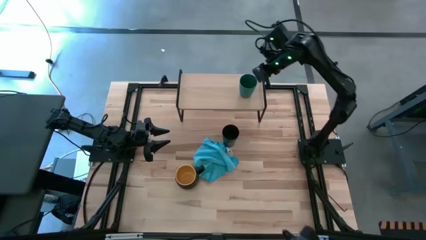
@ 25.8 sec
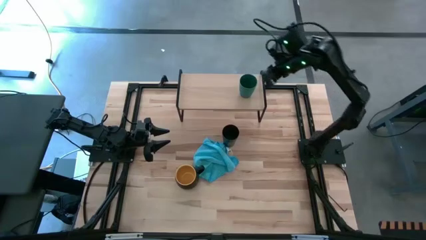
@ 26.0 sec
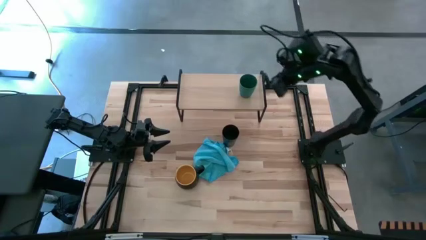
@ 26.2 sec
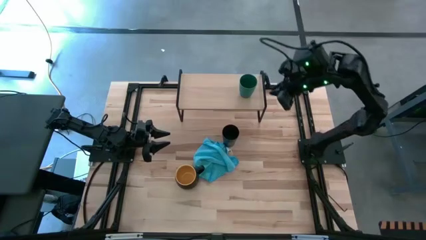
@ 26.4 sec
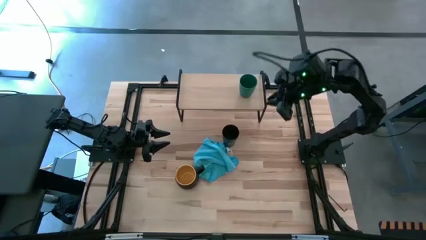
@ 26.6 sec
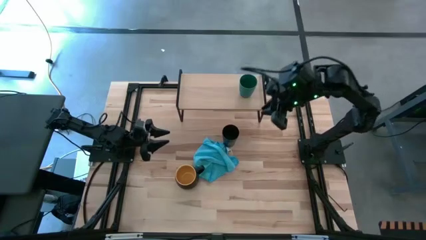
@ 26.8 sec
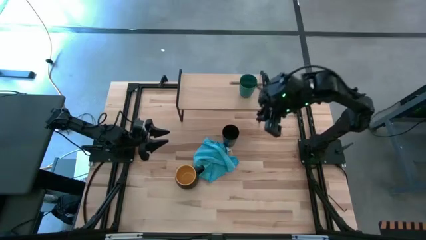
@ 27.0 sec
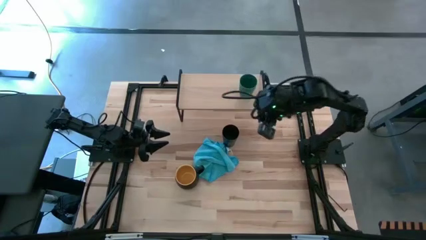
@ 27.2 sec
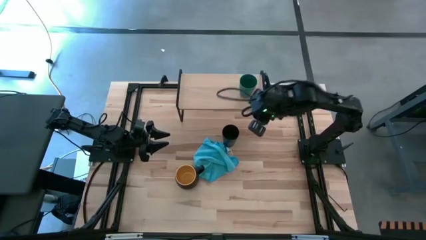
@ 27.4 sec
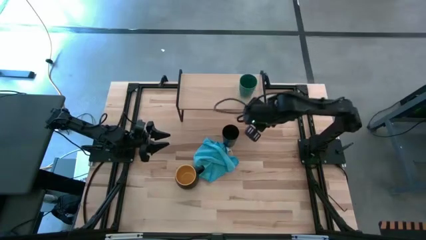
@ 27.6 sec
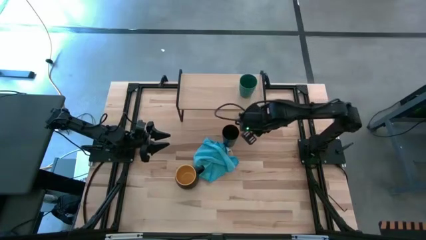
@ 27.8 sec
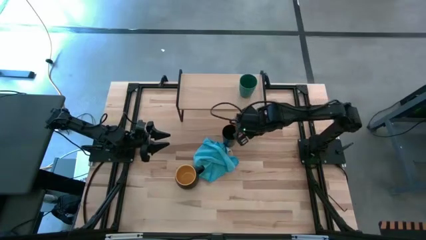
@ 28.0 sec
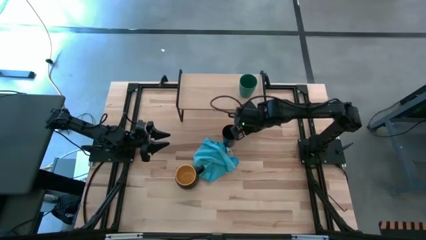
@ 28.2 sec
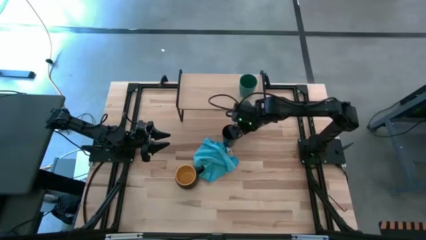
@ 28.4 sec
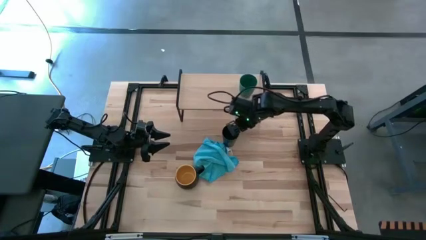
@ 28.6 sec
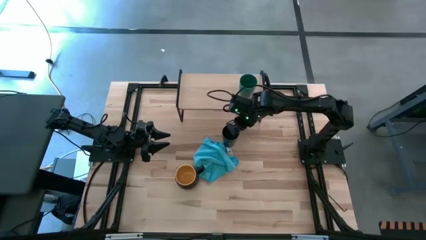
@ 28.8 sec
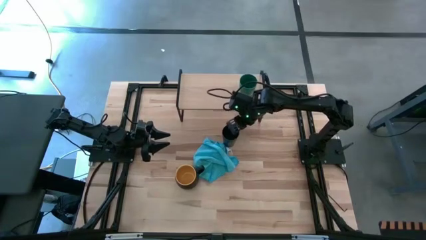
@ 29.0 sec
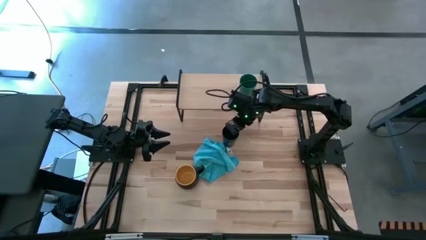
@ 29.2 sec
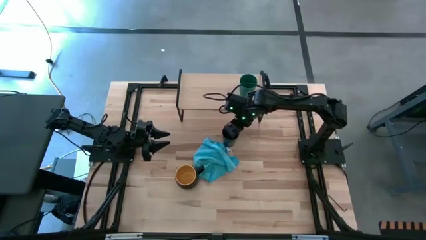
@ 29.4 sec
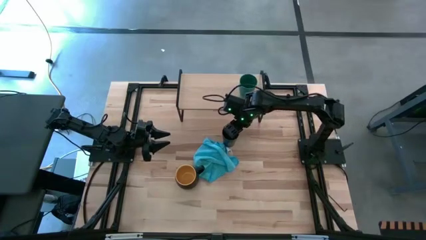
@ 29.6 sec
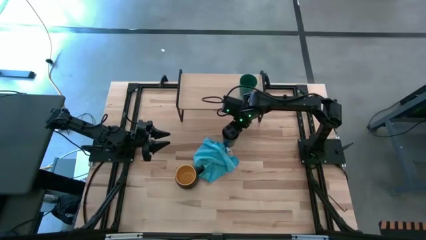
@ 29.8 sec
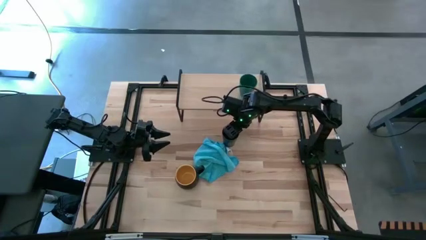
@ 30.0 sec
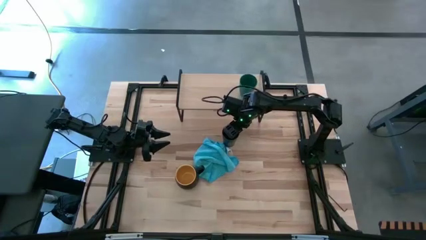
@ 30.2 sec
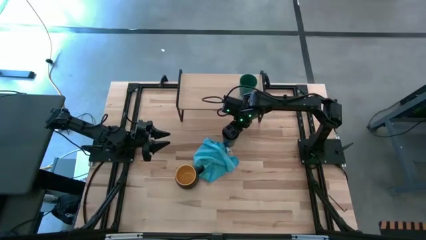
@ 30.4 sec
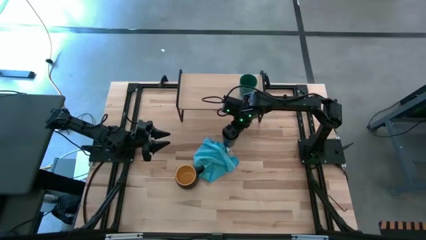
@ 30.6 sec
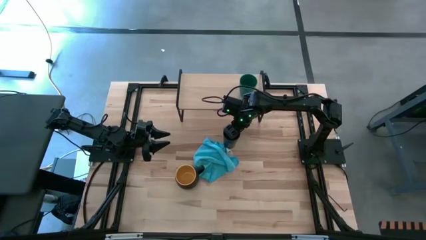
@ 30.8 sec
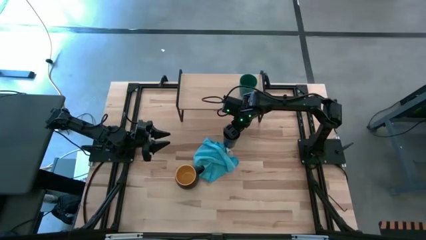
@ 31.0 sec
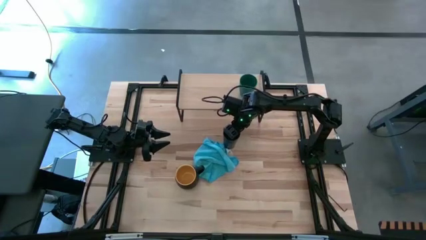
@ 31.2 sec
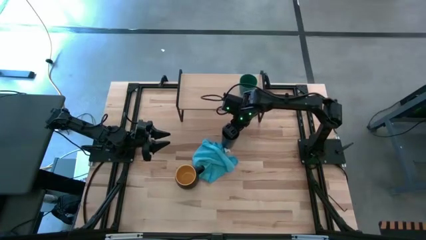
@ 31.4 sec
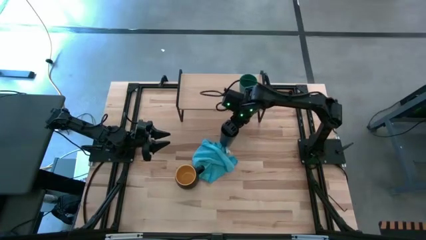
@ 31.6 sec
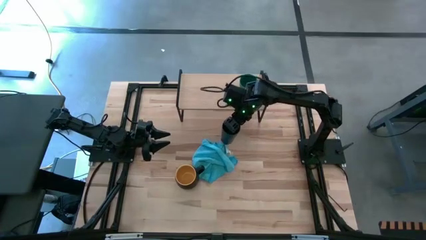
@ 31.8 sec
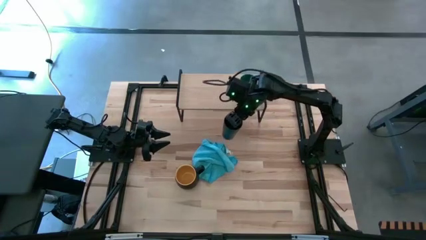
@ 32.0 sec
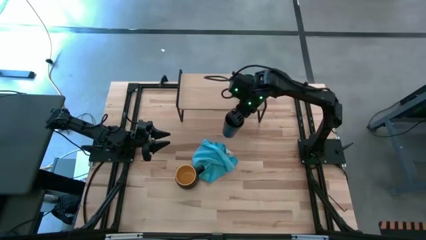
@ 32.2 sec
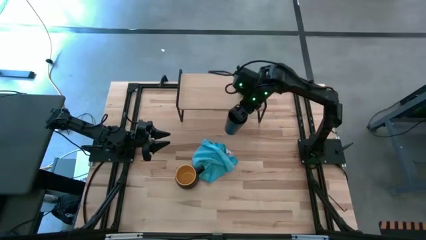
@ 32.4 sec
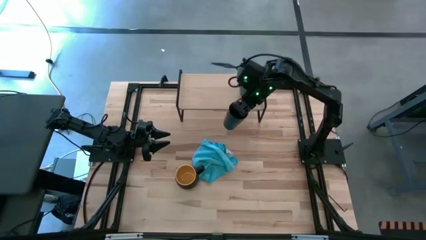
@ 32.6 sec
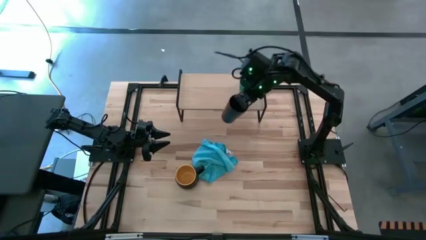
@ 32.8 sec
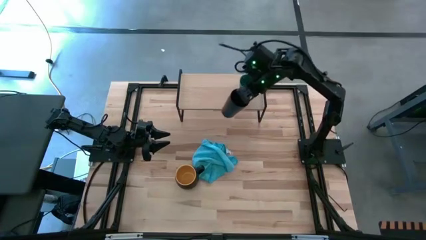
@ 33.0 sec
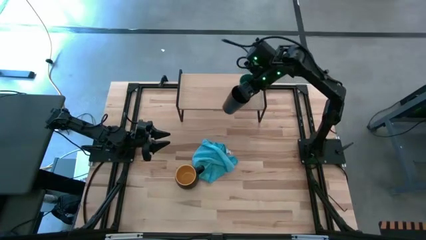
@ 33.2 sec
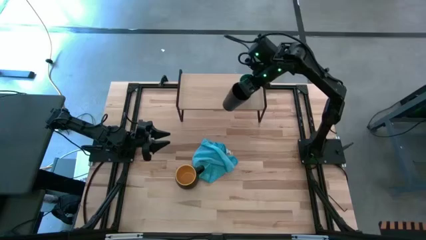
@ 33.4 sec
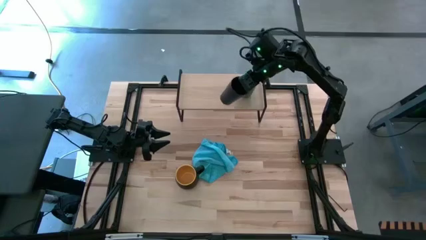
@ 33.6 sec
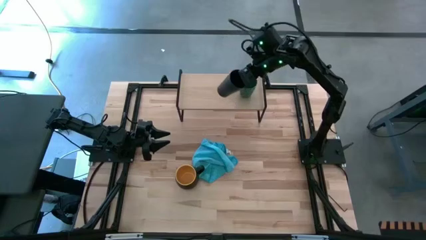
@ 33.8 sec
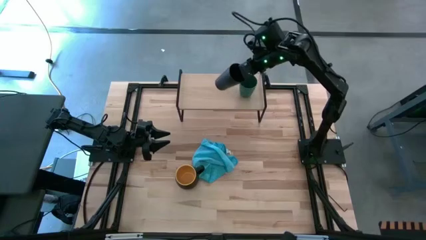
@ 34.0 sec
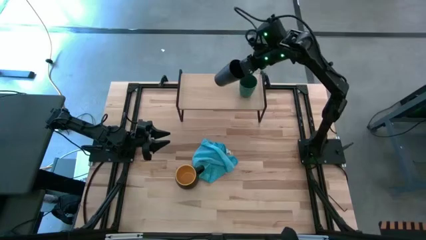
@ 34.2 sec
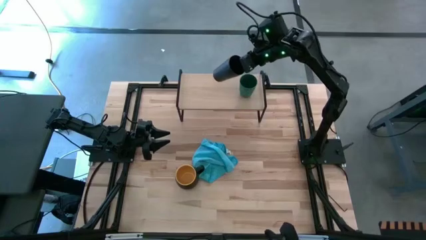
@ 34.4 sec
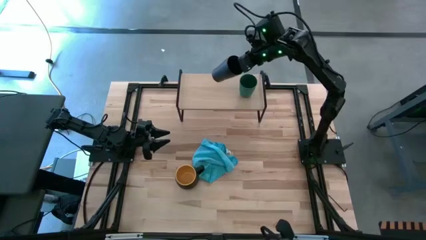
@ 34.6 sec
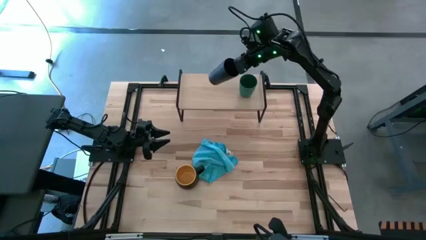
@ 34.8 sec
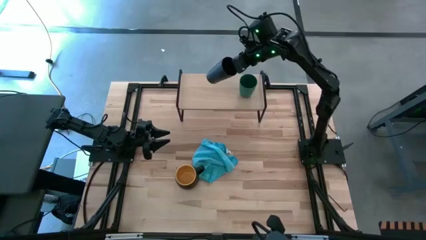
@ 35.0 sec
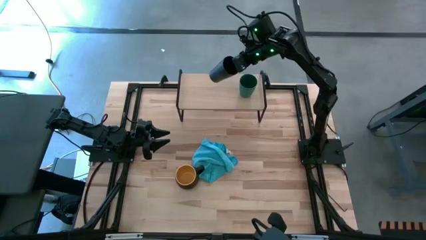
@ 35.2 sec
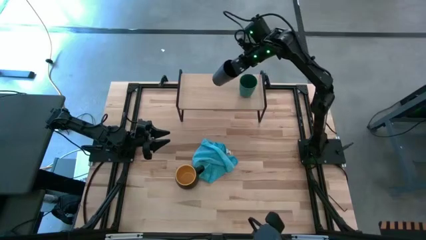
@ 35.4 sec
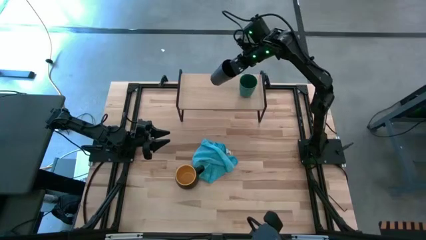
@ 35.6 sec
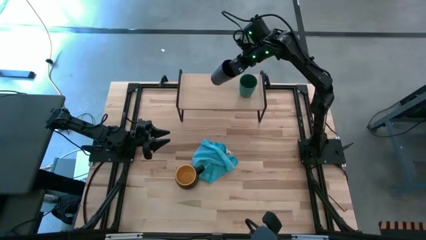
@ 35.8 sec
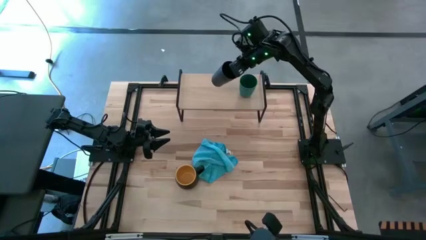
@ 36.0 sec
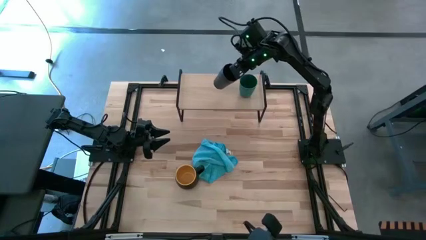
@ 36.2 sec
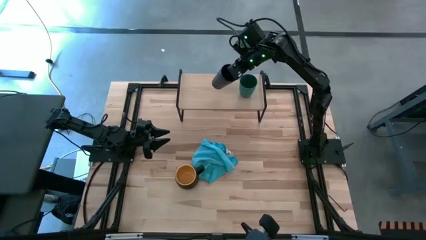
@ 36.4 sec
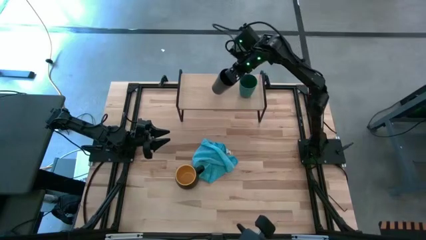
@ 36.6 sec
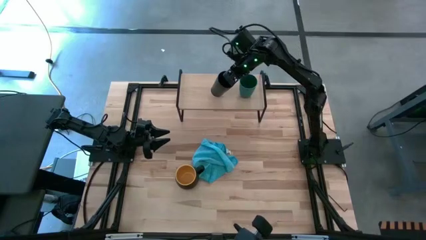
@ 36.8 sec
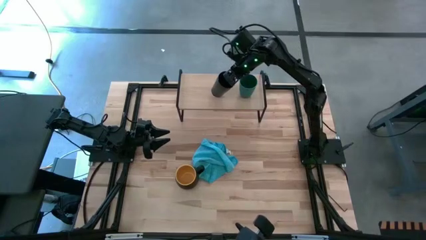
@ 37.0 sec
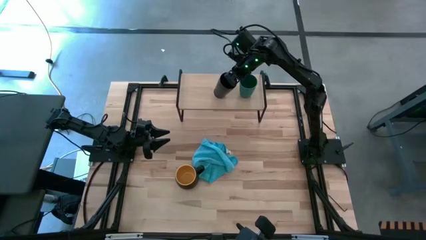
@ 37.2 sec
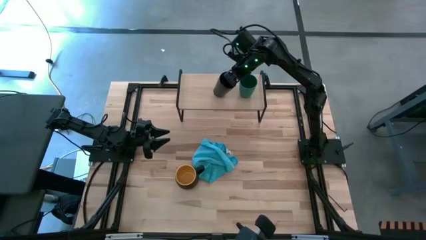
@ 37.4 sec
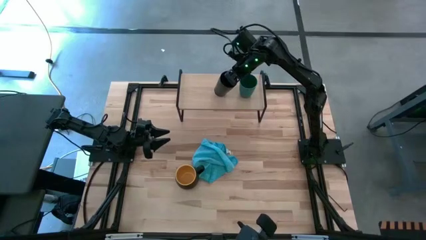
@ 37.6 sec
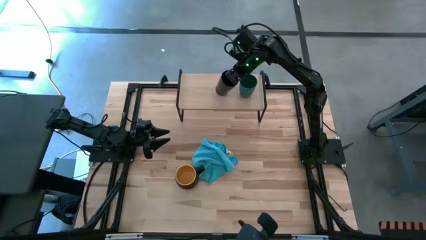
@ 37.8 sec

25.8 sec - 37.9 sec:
Task: Stack small to large cups/mugs on shelf
Put the black cup on the shelf
